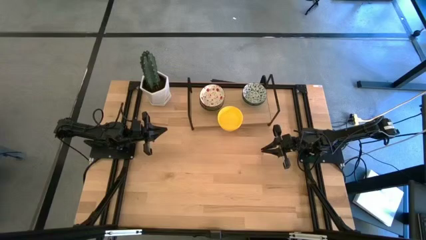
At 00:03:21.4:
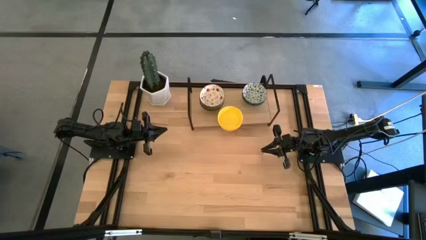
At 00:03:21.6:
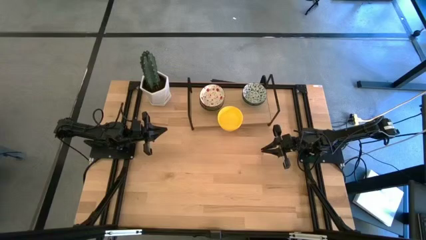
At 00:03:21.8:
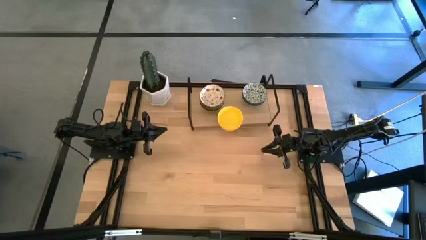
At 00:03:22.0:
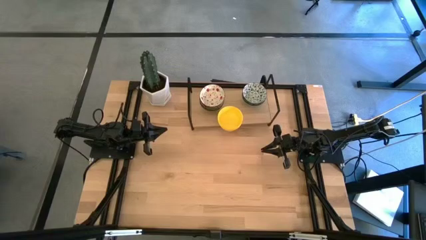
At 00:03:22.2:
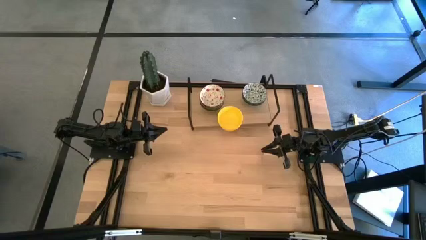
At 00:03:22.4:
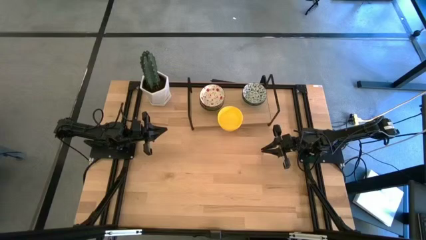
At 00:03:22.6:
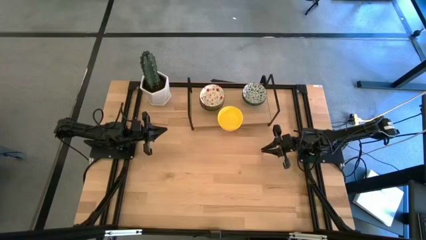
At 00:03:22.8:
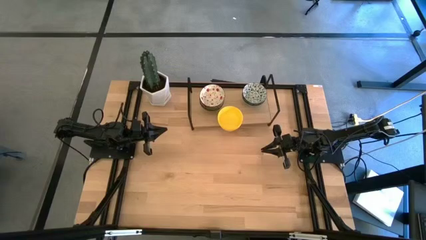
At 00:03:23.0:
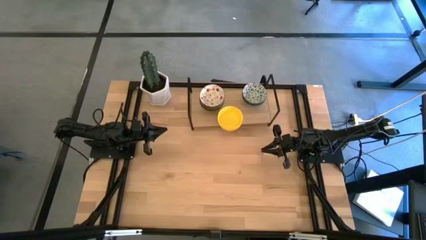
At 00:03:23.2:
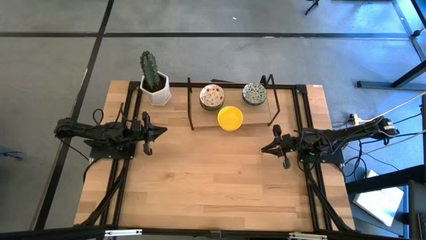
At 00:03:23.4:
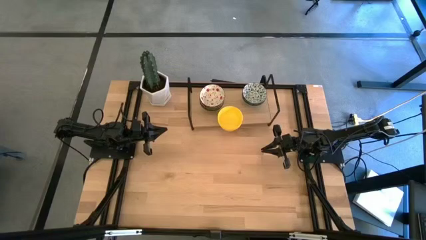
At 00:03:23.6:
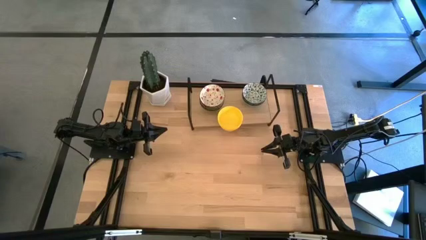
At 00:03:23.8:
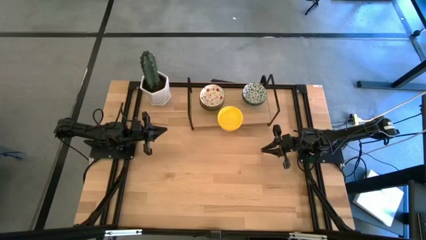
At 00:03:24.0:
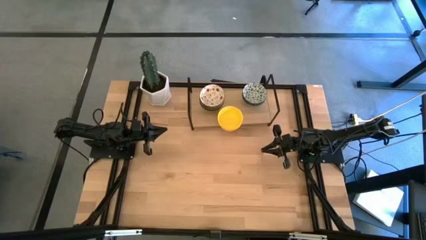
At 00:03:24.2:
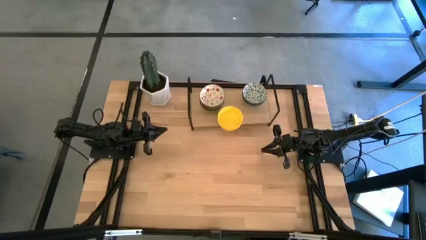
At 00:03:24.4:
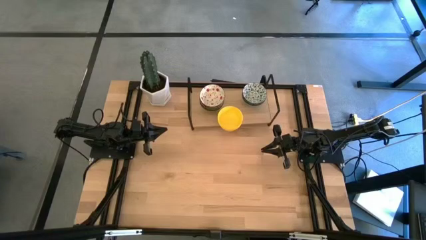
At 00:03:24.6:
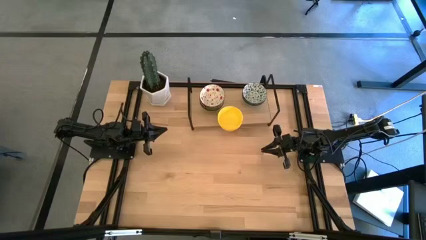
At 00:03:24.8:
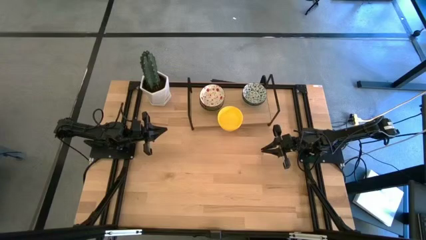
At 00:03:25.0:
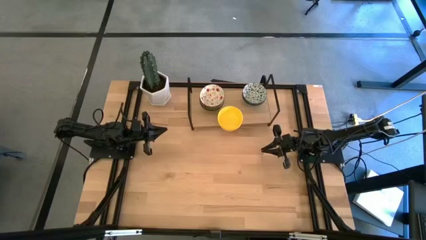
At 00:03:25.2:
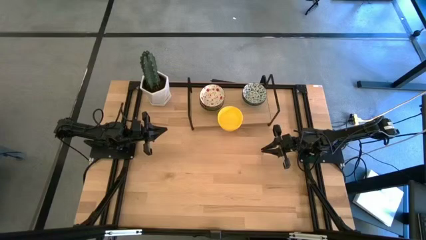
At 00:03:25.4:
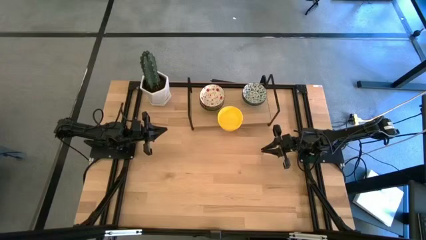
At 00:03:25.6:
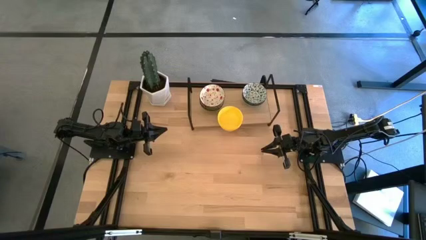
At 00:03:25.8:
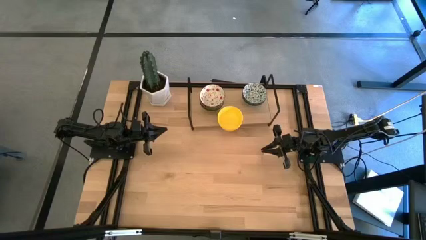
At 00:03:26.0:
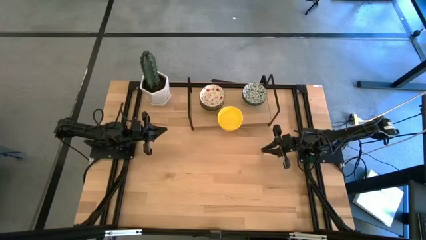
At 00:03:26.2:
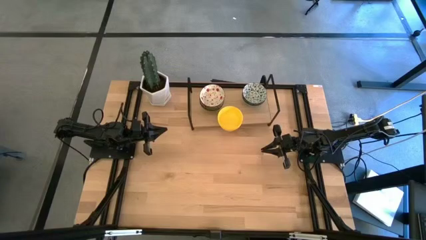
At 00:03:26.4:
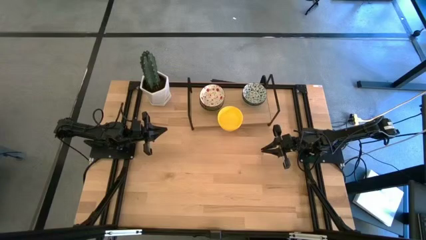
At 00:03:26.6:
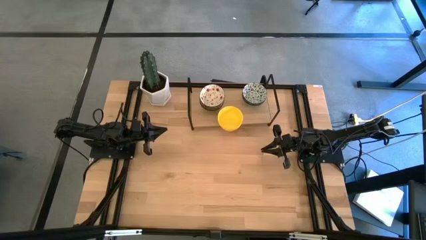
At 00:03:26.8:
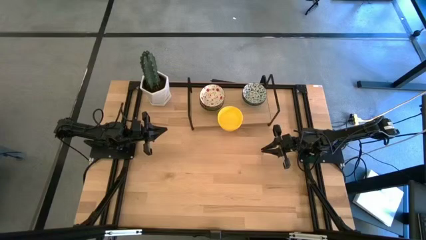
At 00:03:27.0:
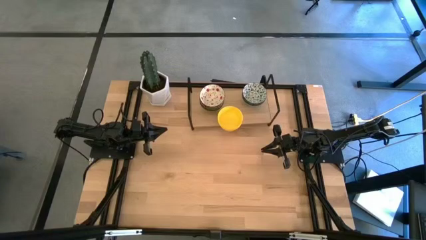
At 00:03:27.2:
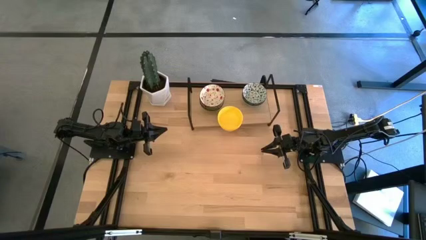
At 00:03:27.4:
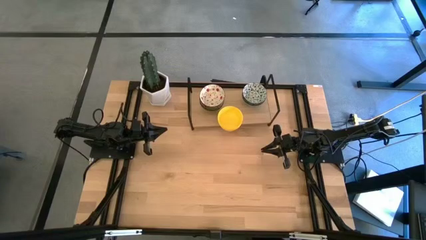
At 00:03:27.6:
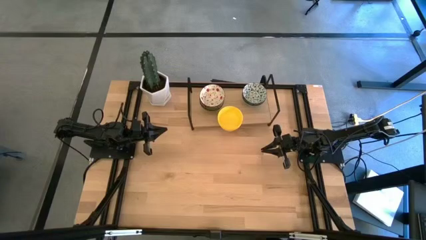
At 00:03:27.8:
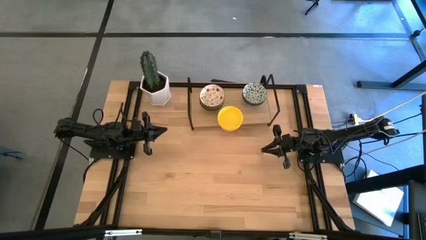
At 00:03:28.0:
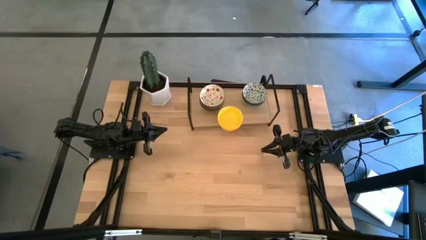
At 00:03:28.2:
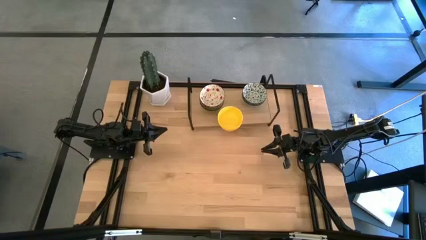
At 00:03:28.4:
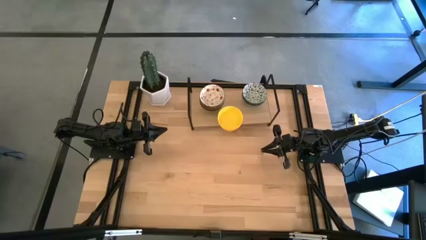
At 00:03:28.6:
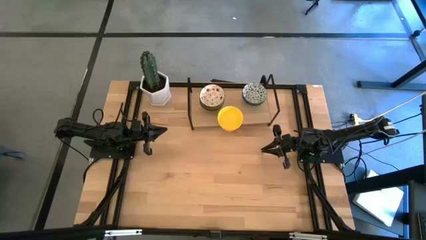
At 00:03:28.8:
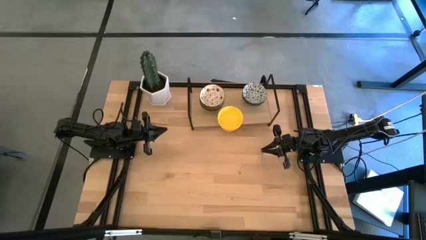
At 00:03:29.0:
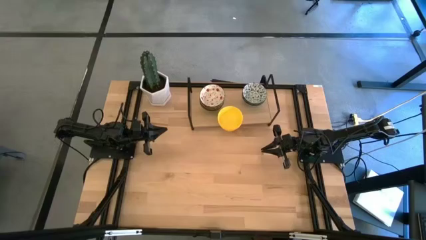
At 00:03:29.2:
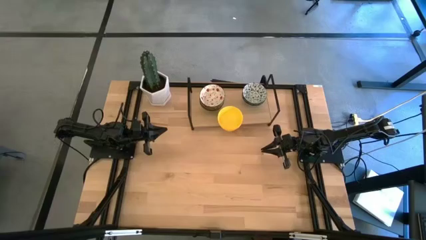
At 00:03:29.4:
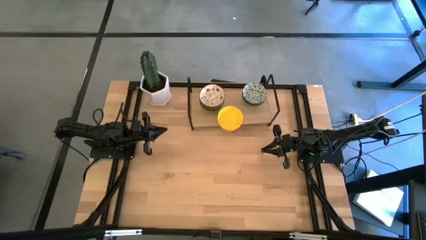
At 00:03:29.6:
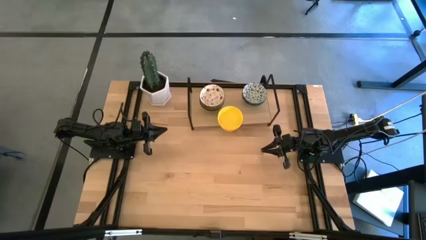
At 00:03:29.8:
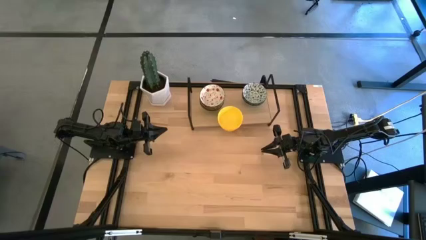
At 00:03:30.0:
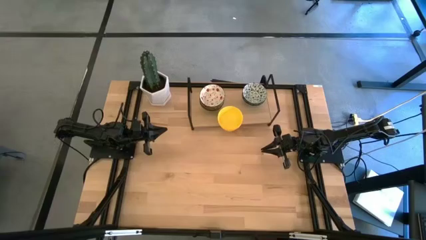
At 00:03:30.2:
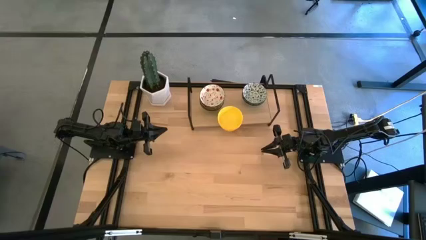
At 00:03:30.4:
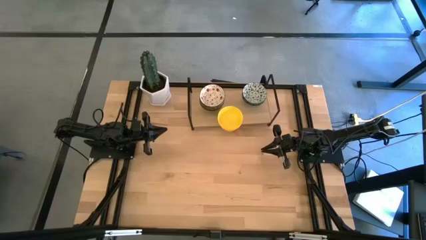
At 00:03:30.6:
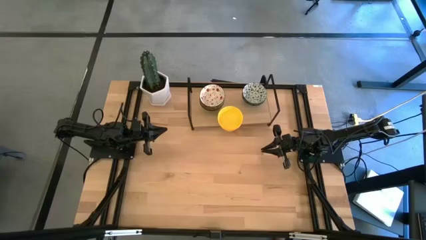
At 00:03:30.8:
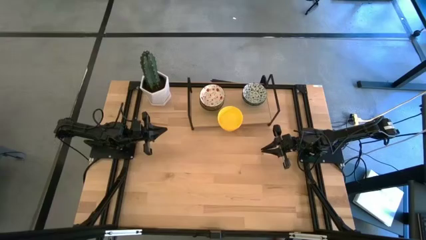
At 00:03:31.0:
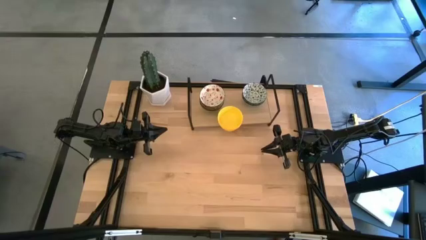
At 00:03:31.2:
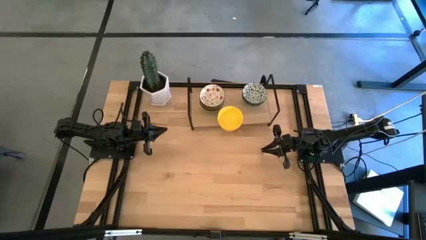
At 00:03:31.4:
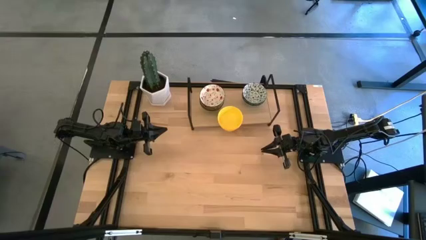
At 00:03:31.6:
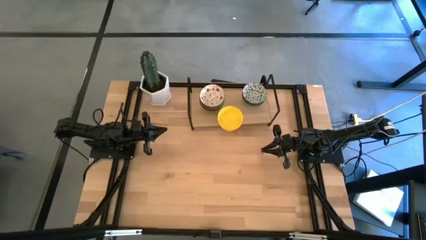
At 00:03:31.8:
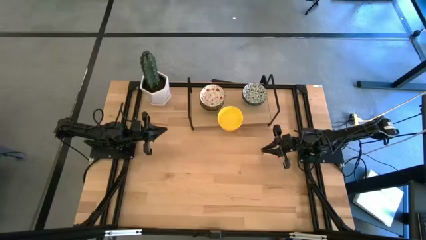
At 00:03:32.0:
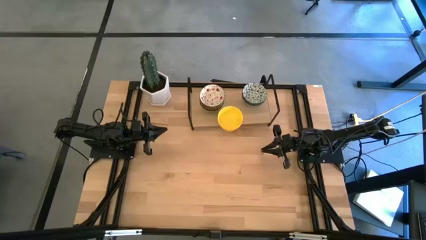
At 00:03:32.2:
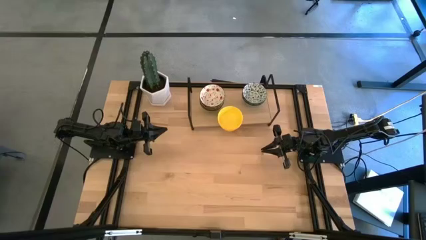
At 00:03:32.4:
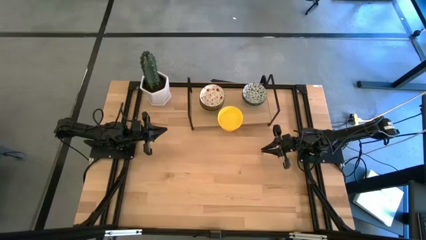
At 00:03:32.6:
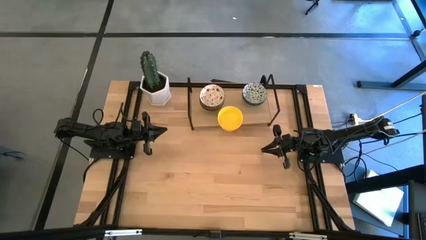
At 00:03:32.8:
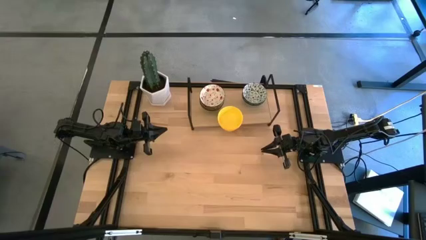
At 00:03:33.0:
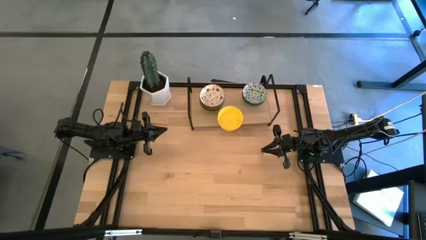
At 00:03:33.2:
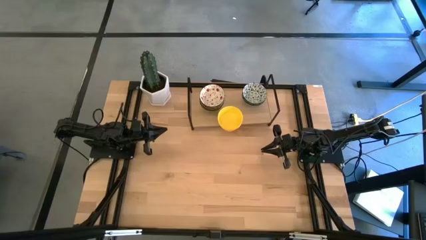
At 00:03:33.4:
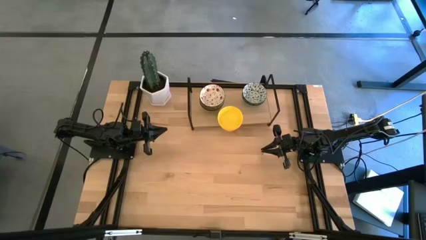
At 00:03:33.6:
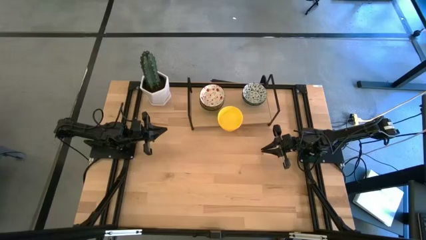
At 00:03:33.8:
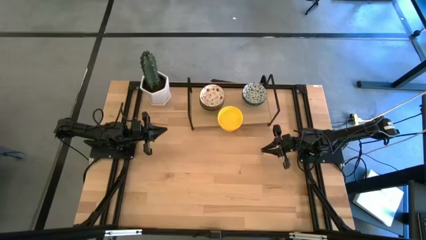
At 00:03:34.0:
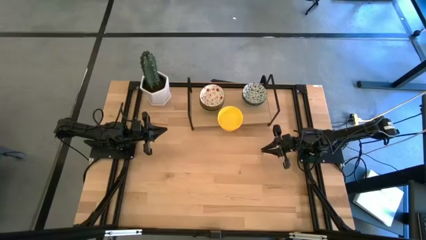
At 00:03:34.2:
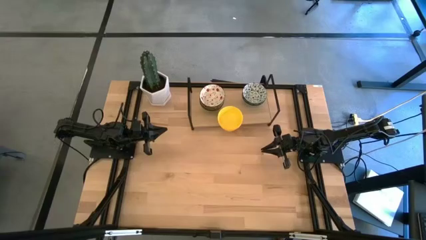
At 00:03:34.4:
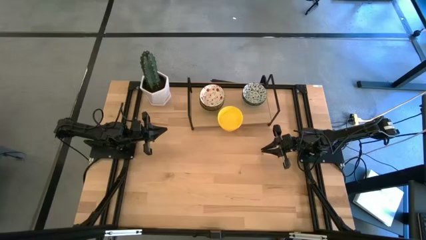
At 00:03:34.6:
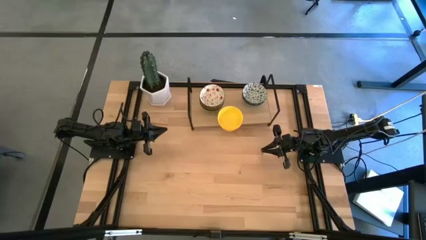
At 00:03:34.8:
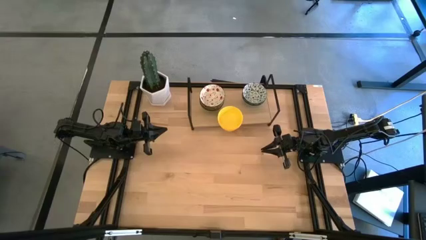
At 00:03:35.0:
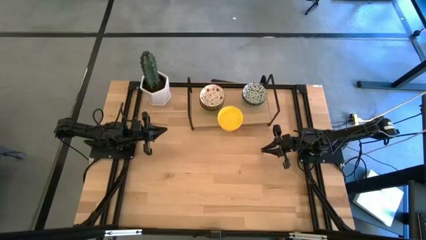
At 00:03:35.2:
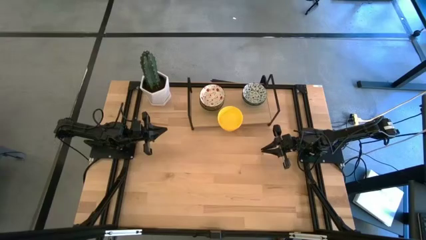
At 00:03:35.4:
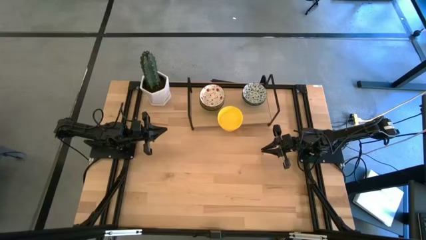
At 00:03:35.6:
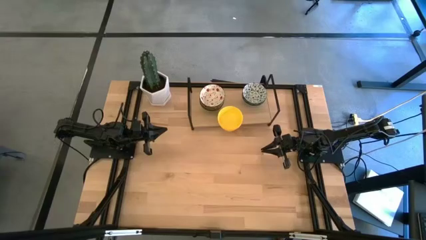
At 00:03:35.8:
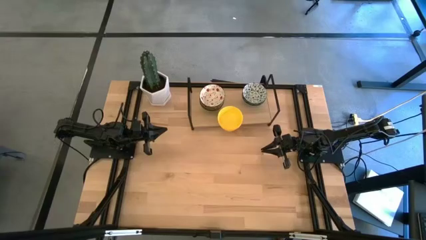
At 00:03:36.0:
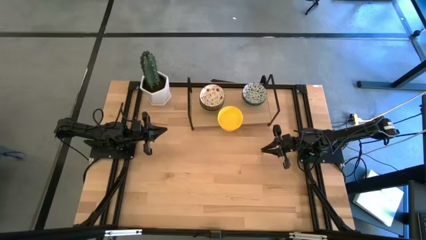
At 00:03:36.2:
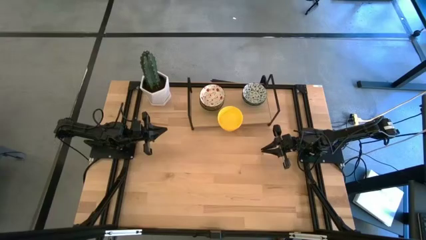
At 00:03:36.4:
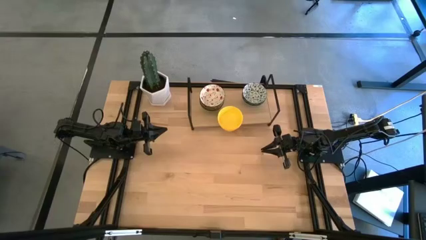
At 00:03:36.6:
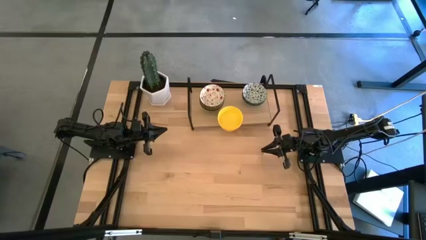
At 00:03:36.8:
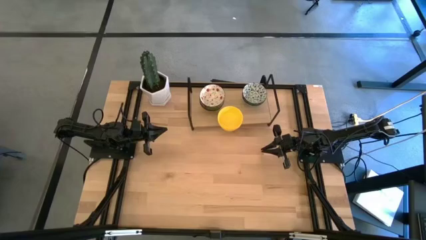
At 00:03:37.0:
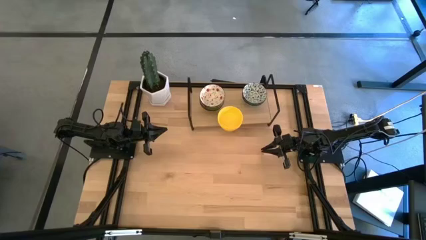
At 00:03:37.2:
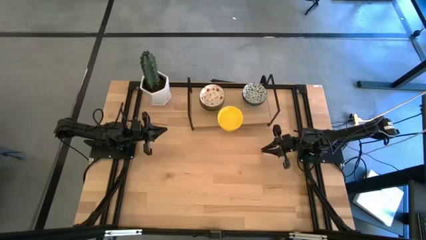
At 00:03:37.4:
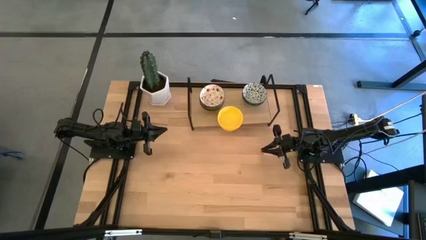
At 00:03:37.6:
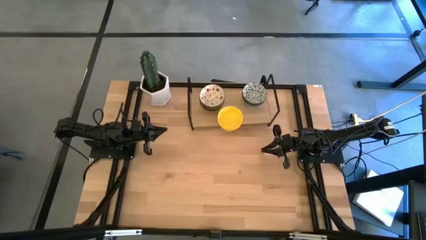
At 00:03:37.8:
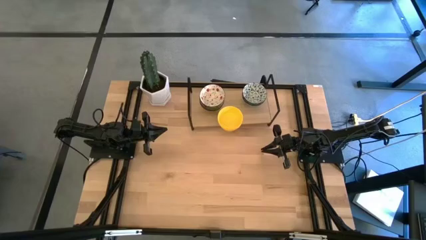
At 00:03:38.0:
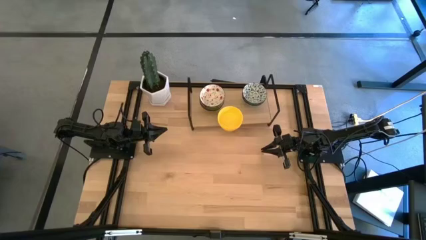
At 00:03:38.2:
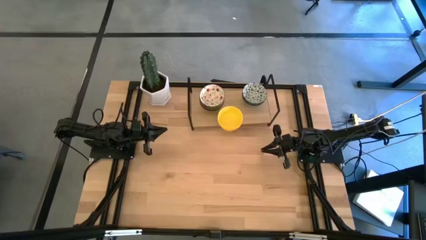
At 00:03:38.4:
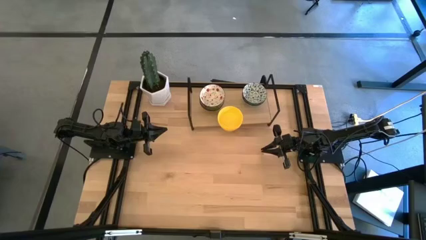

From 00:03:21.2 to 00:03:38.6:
Task: Pick & Place Mini bowls
Return to Home Position
